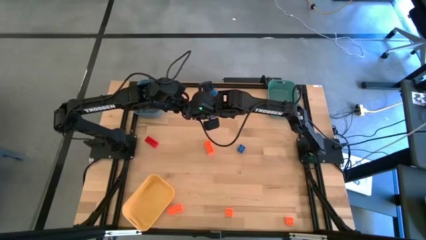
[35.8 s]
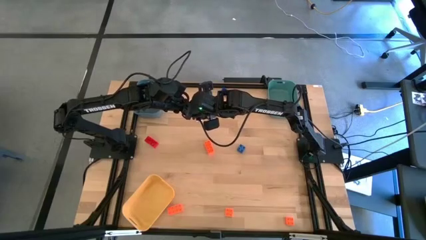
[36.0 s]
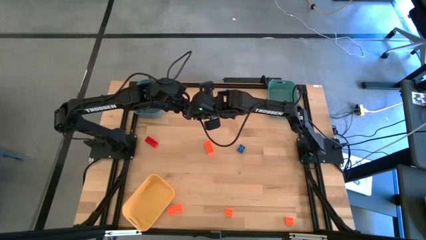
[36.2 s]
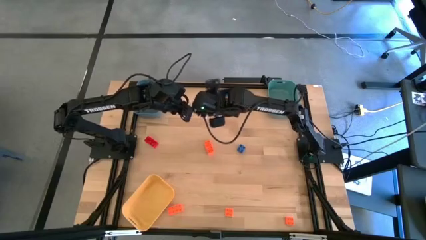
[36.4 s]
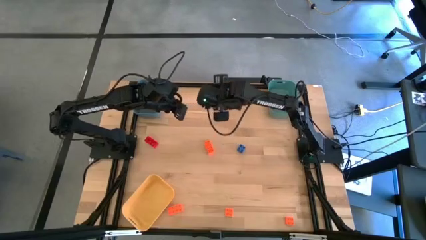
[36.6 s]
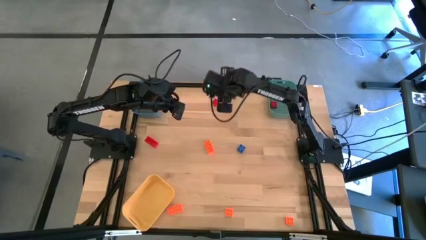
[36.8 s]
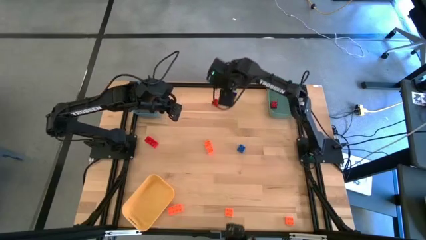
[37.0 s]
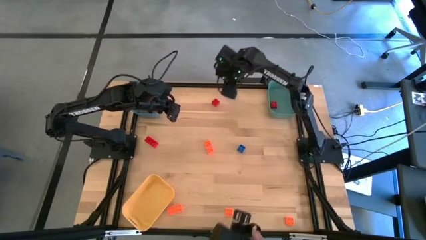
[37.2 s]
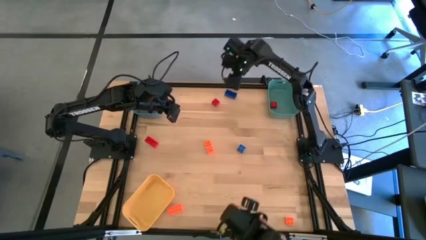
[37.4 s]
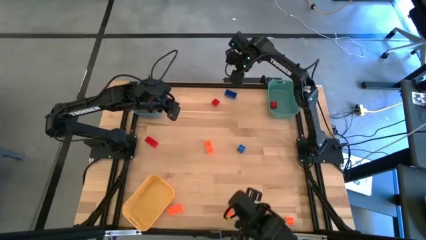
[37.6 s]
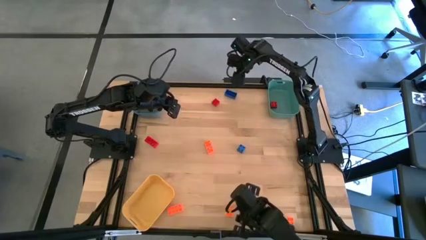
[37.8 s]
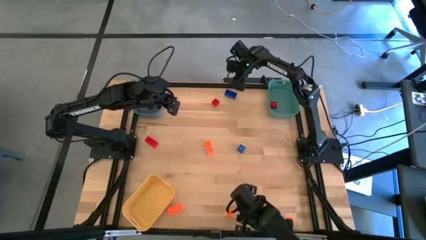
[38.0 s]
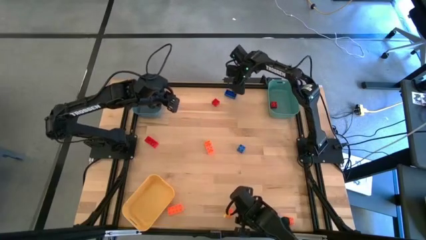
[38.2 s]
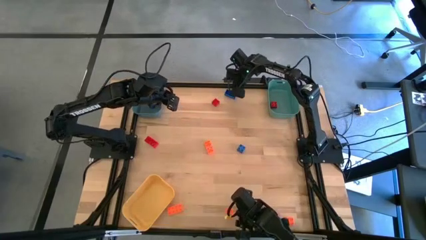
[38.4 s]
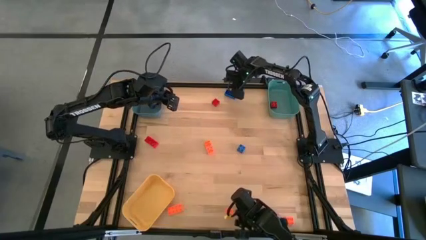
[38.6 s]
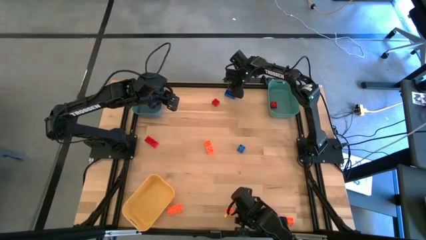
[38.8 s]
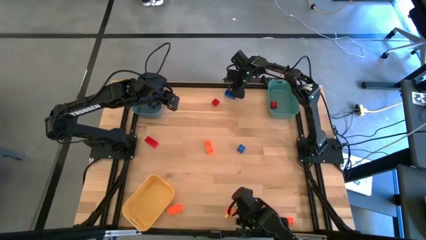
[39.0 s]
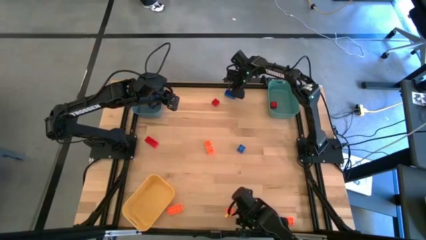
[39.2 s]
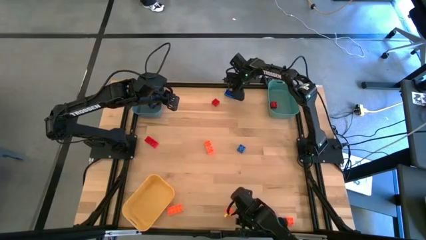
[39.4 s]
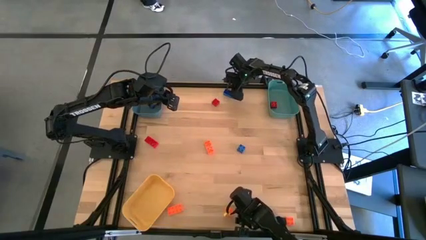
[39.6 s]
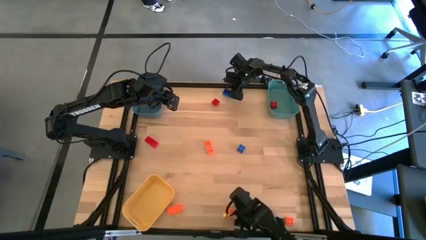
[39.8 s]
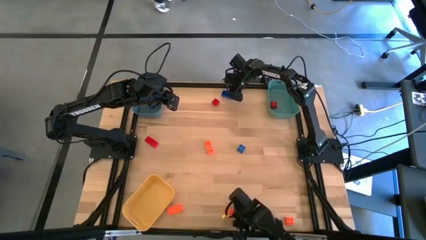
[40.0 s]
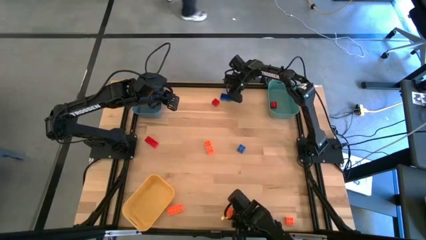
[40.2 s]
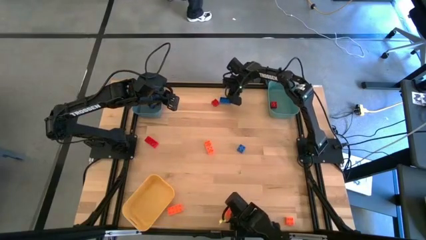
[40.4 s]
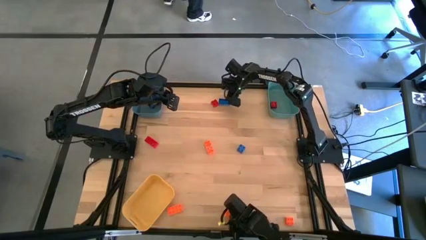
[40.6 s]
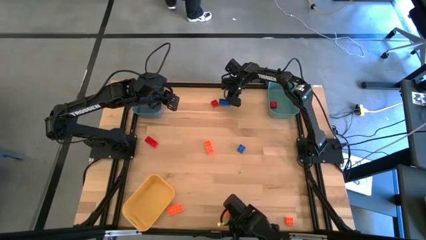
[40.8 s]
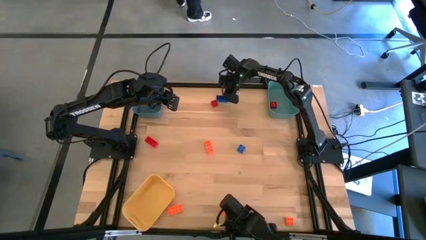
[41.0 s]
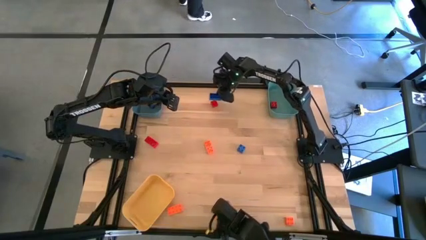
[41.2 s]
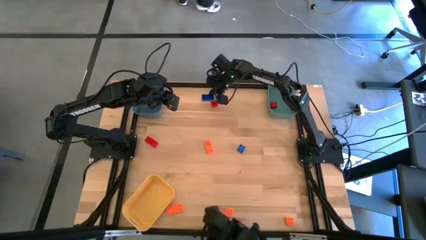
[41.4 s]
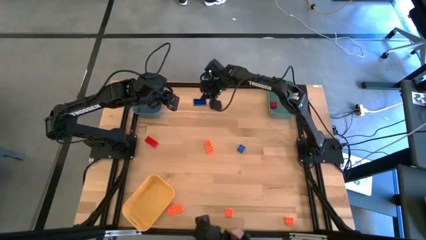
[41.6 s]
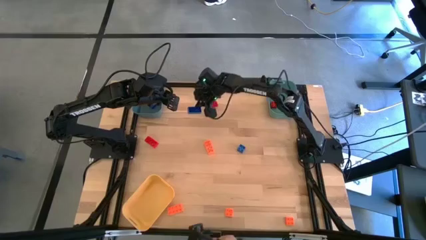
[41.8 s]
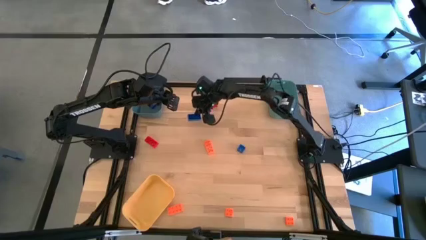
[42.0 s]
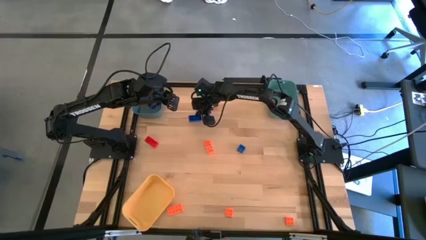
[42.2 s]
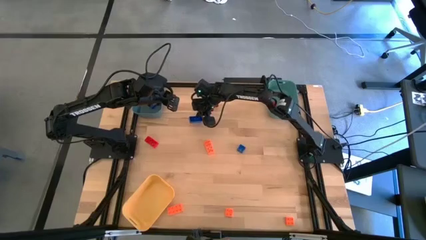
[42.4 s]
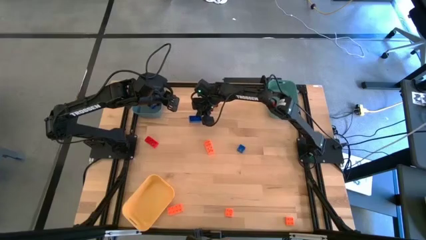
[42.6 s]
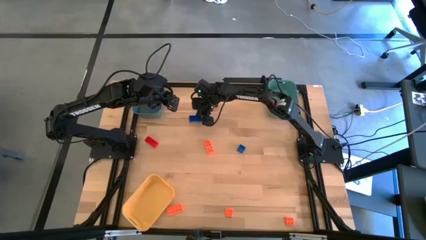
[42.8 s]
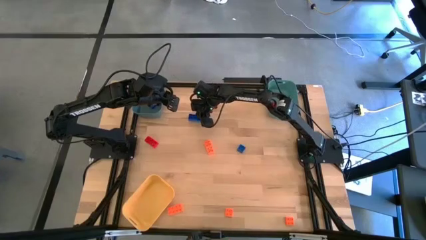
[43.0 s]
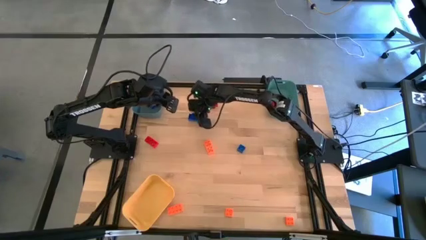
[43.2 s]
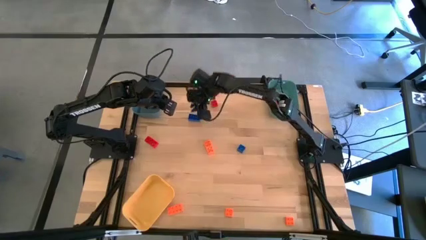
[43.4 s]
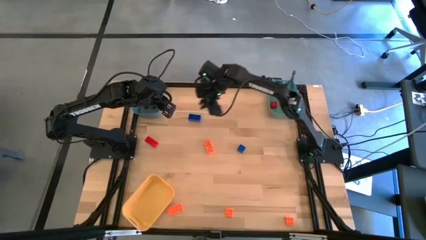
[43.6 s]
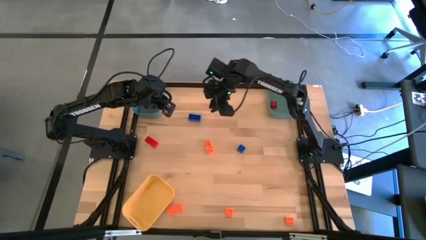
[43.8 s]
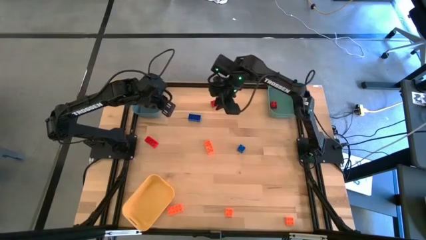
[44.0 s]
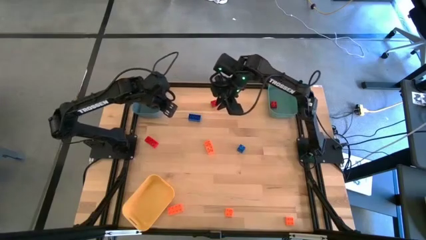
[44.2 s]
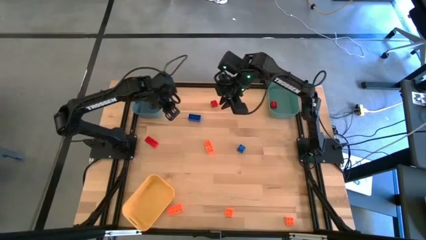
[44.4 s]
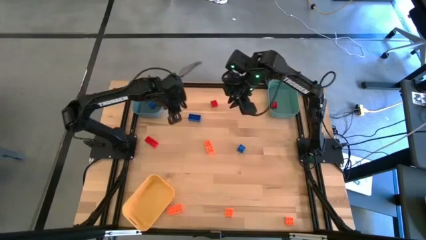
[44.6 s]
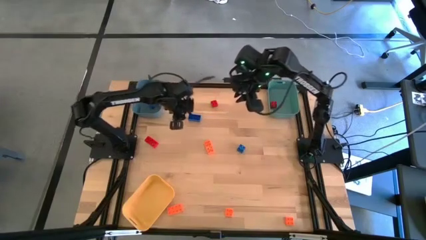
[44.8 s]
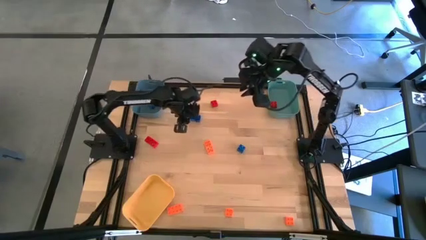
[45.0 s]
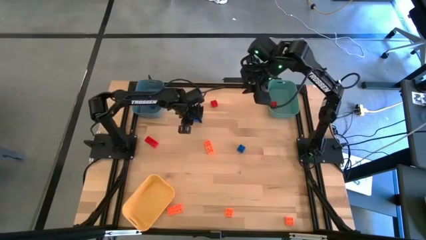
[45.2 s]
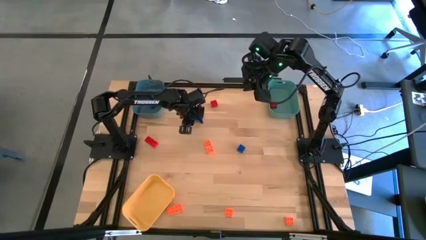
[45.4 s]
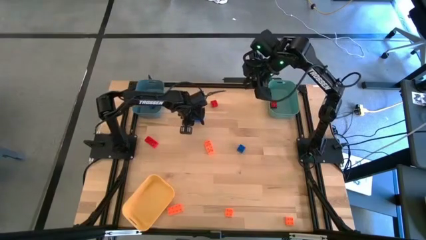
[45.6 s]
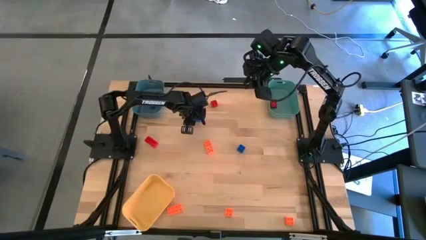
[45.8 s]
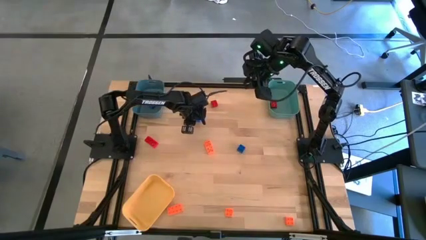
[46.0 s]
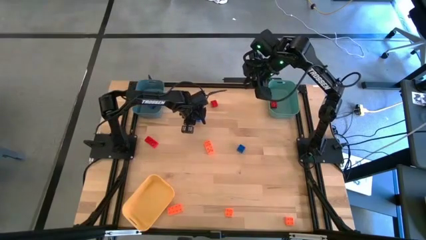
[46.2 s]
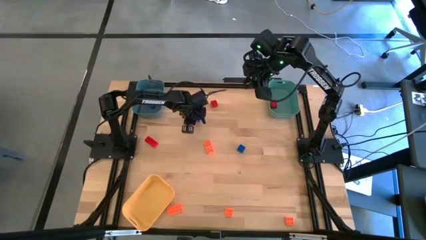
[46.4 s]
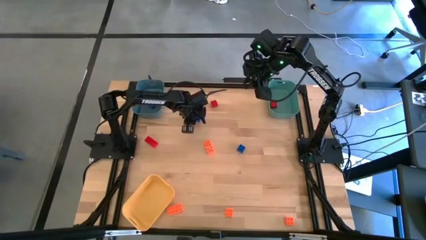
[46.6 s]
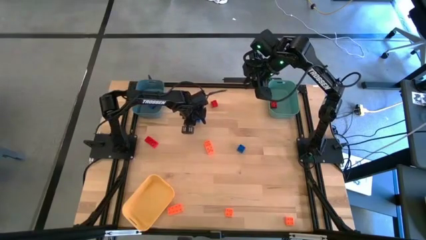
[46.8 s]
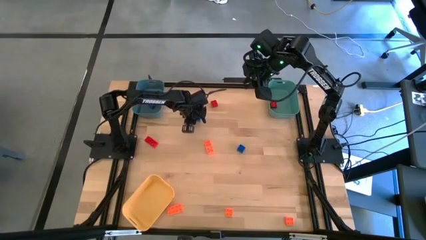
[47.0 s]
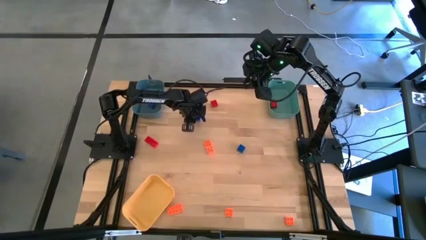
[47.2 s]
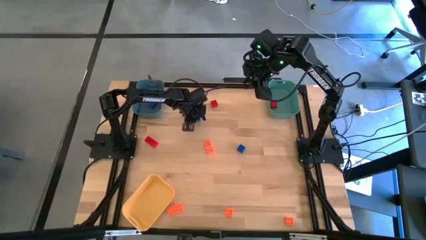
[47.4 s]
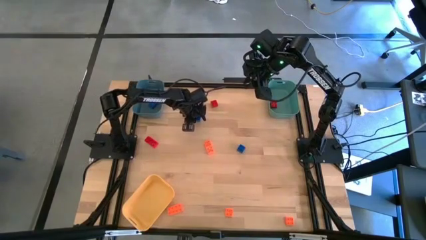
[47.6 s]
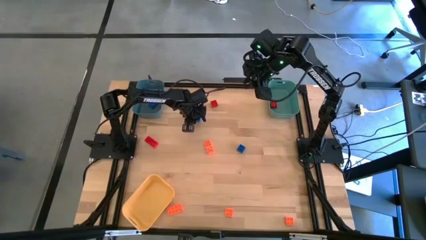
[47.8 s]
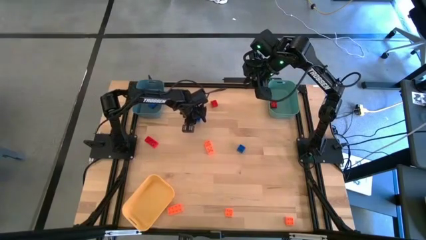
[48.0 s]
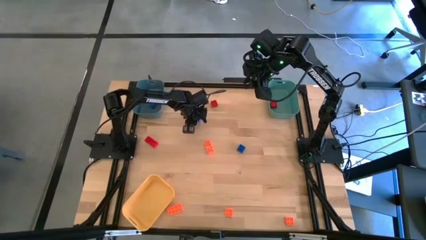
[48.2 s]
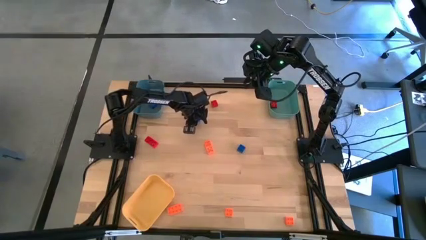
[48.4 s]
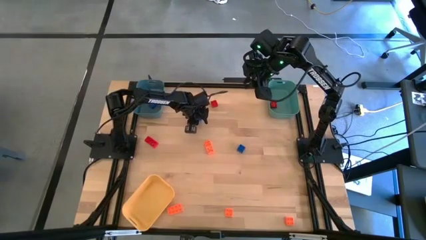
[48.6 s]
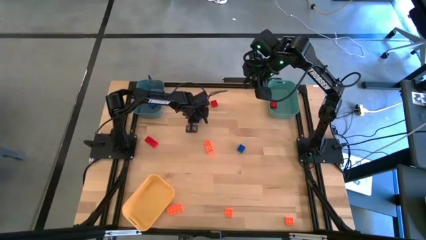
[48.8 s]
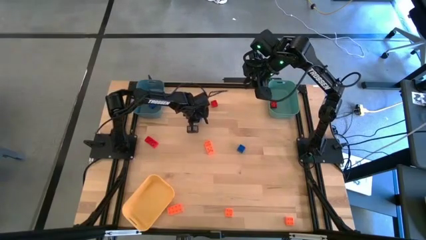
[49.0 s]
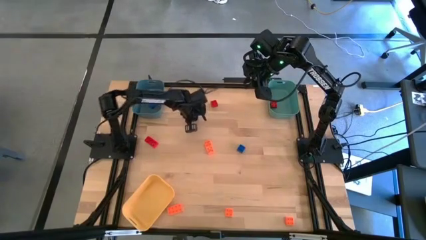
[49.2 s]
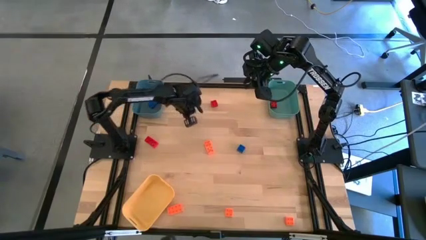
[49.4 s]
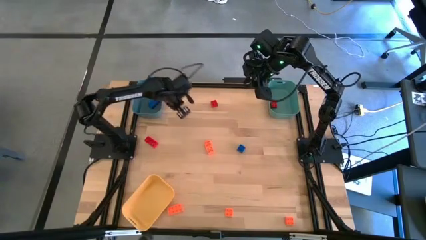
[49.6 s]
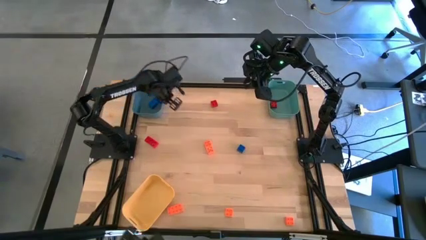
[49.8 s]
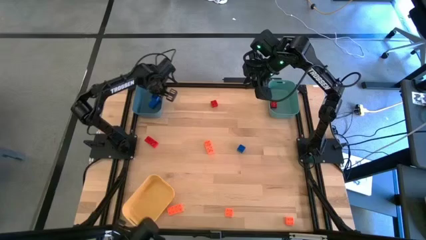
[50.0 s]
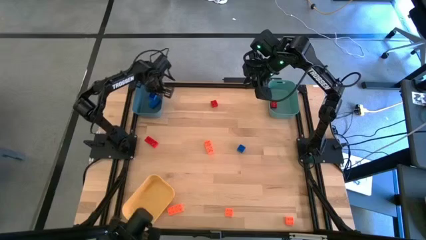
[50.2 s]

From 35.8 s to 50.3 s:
Task: Sort & place blocks by color
Put the top blue game piece into the blue bin
